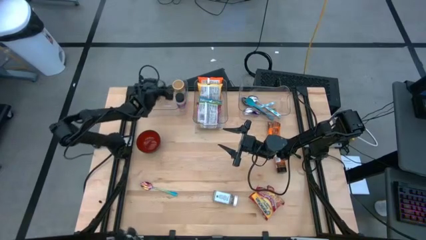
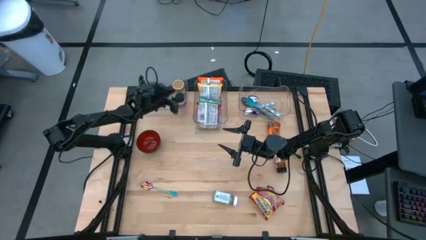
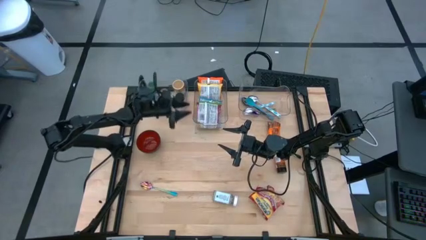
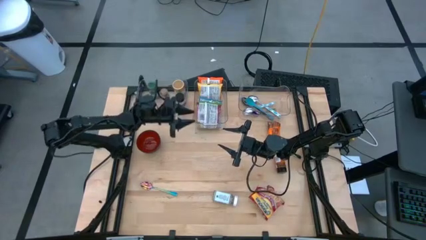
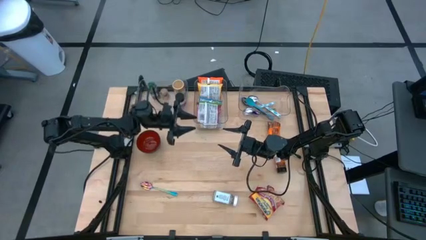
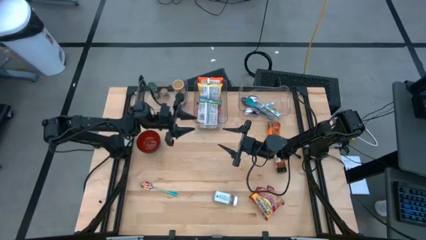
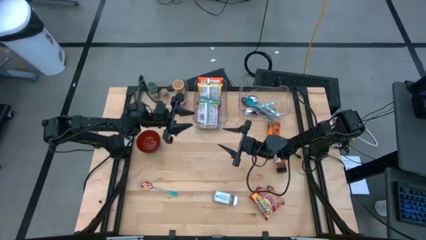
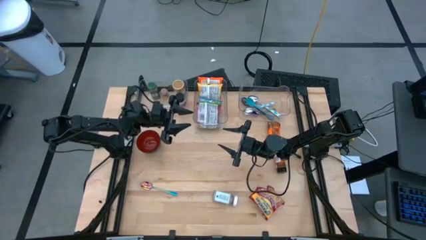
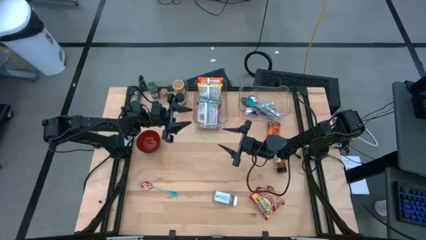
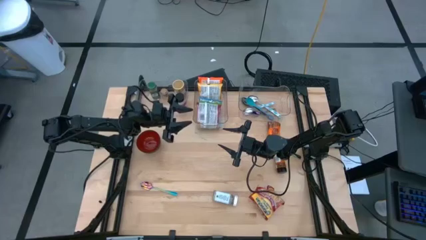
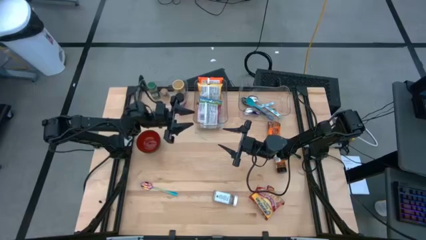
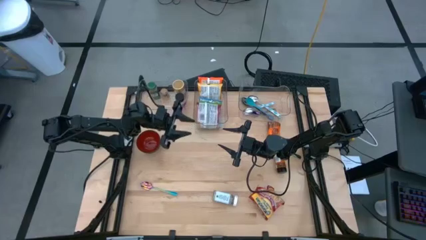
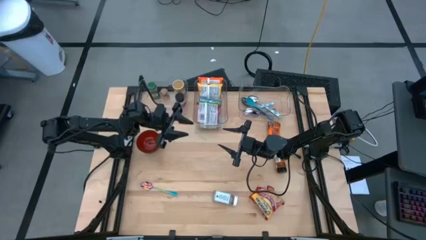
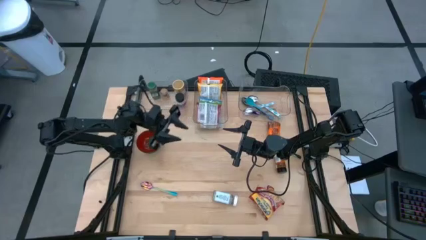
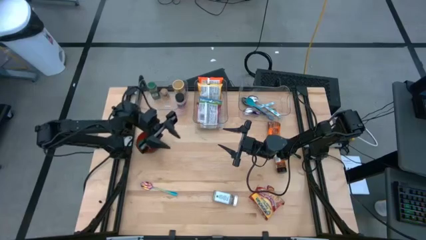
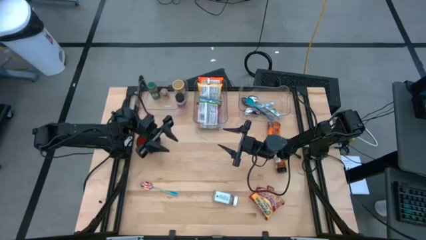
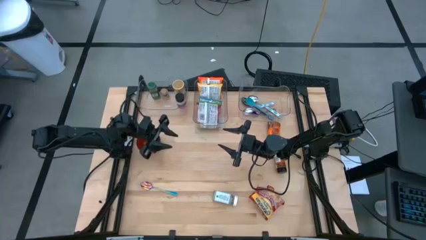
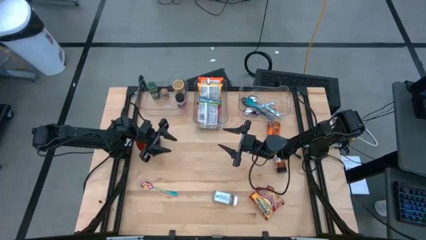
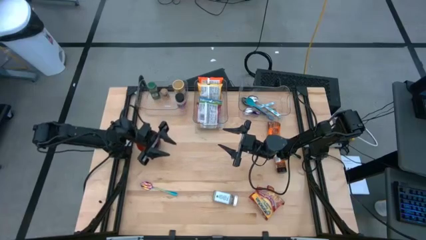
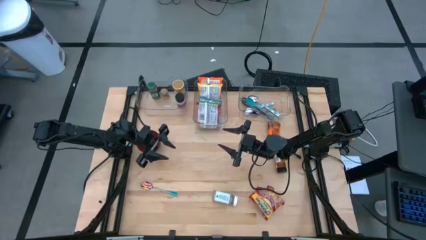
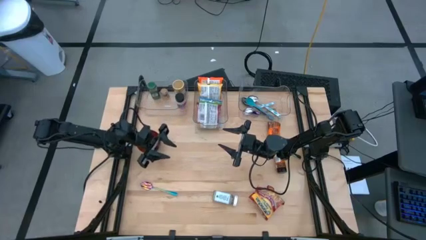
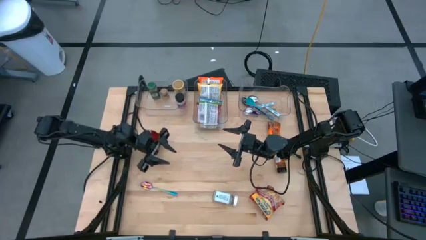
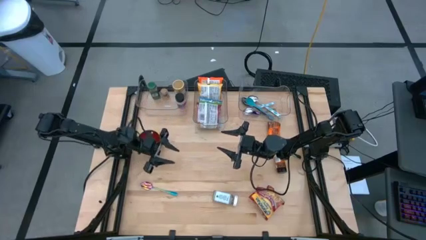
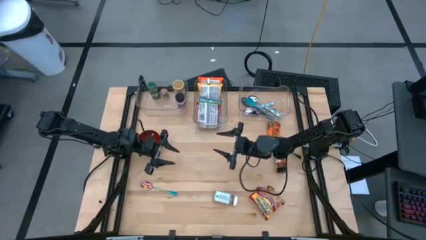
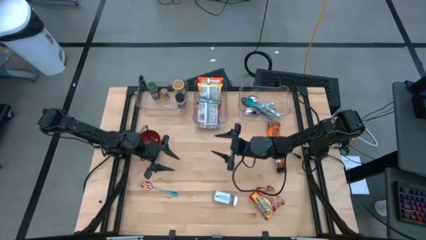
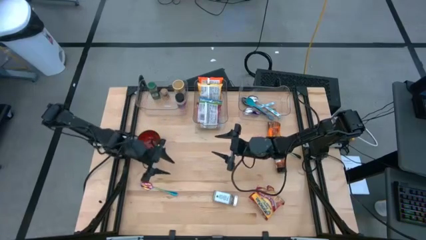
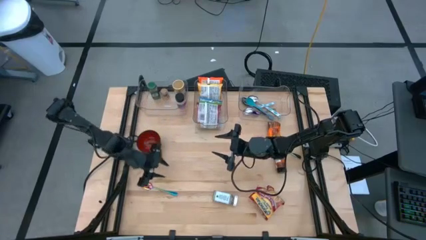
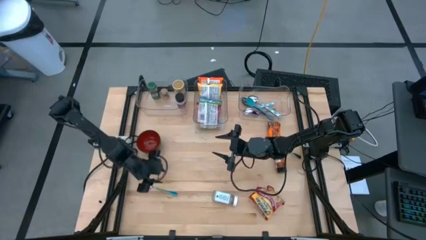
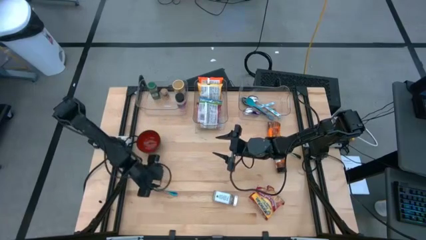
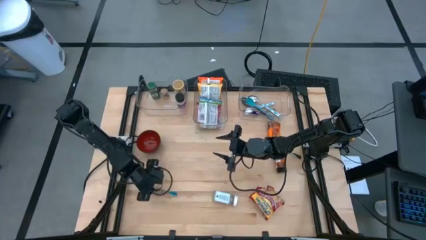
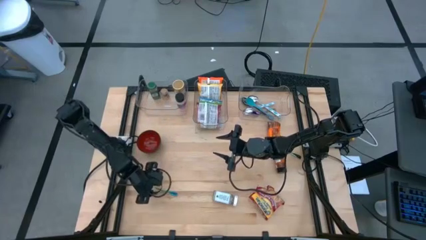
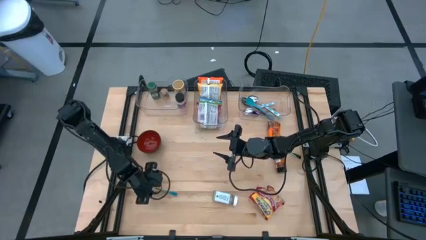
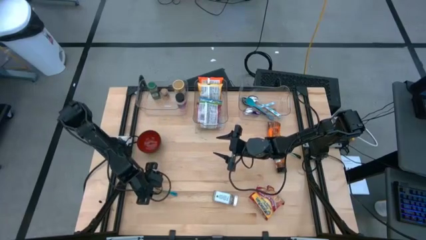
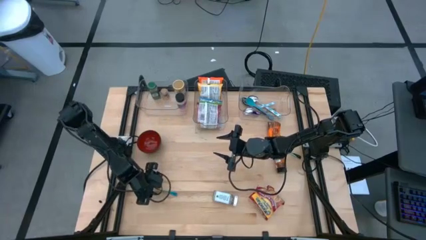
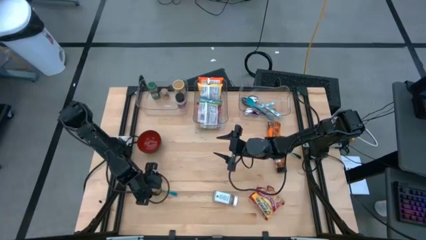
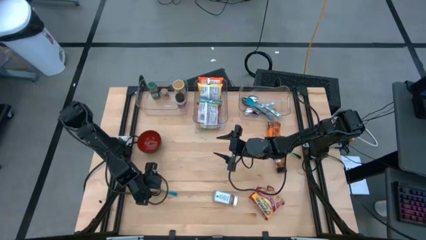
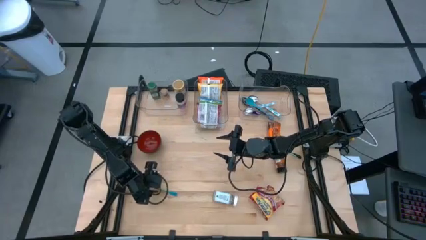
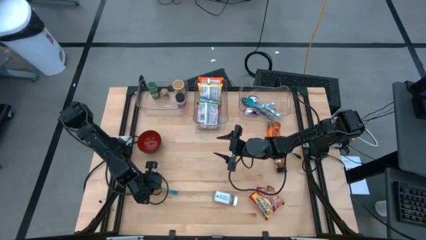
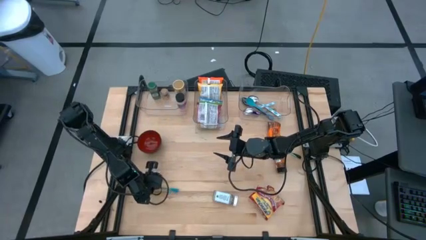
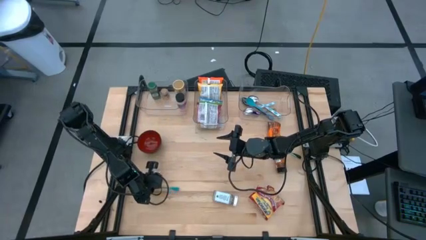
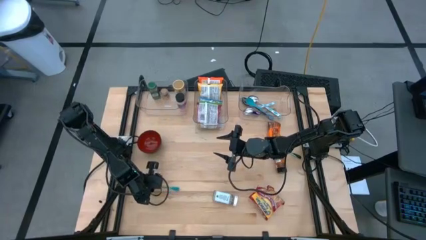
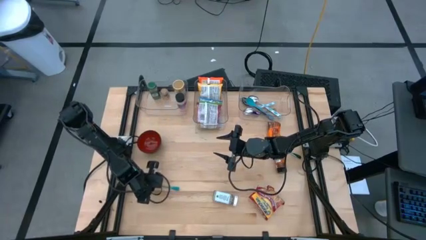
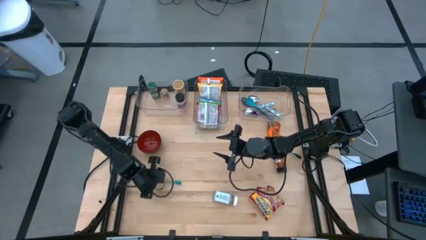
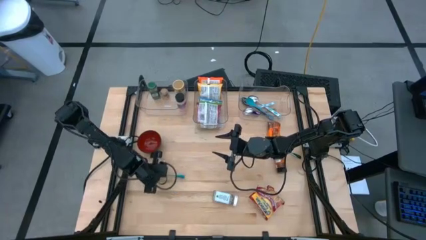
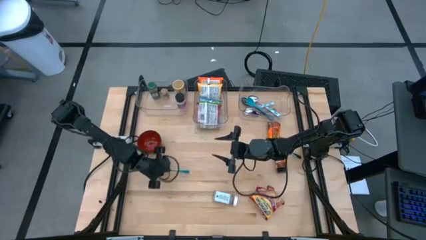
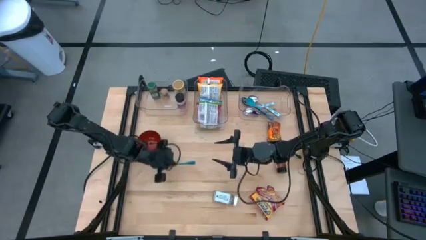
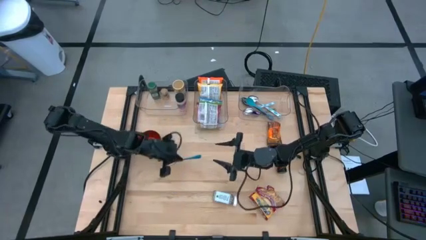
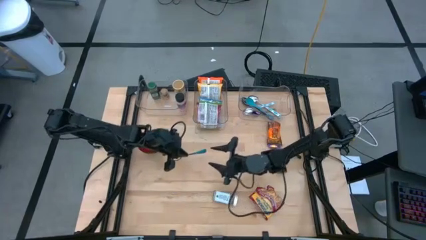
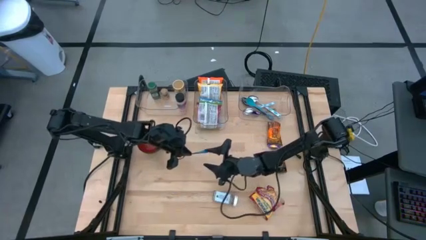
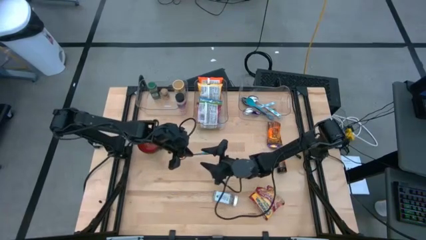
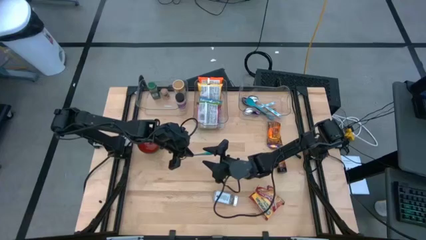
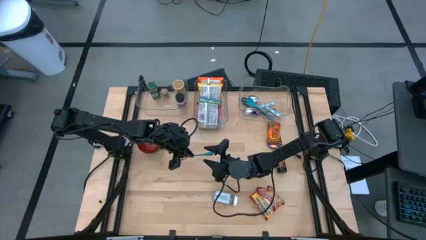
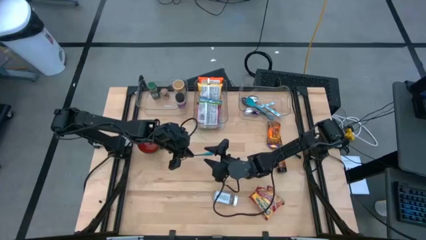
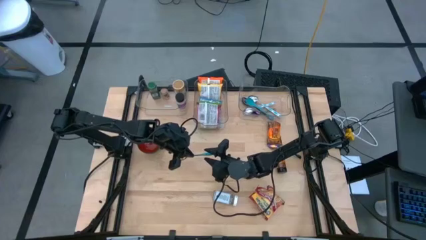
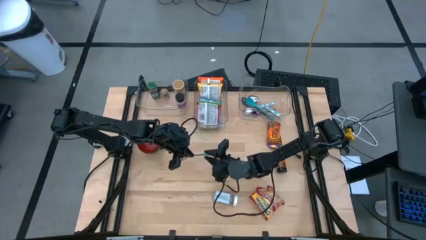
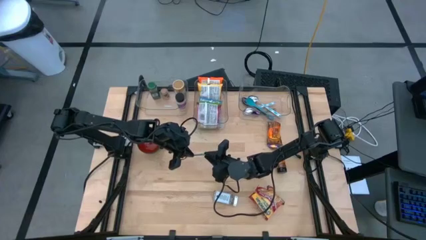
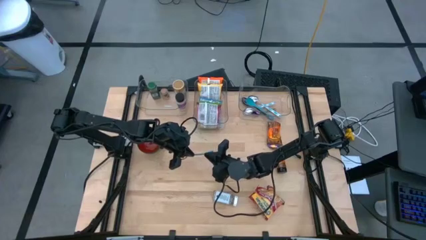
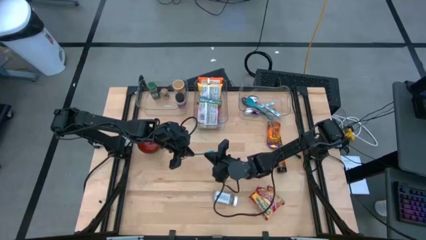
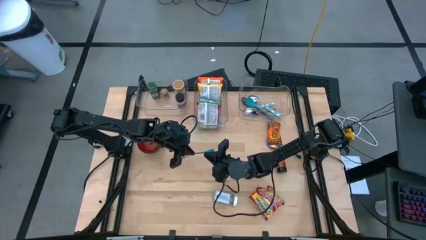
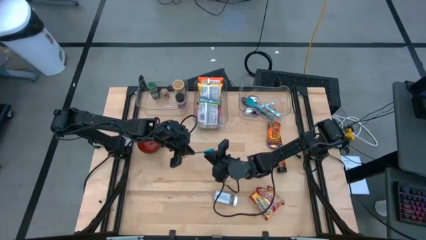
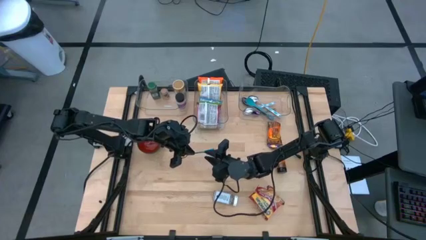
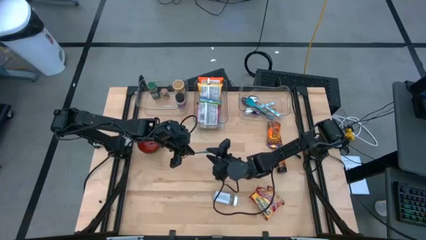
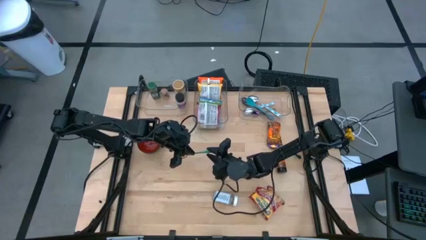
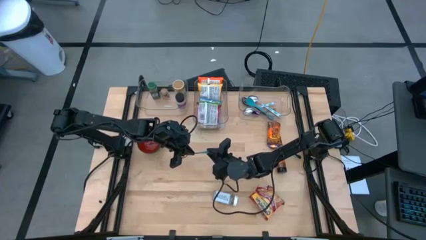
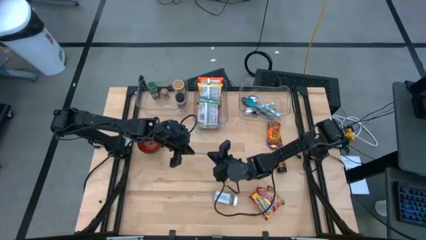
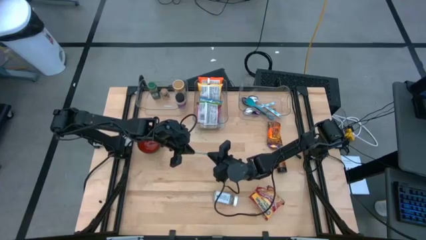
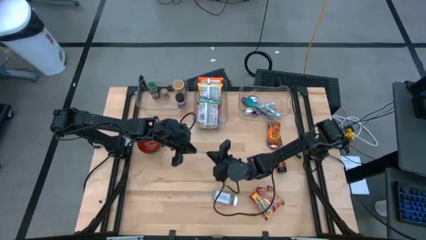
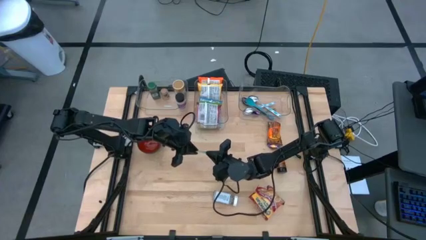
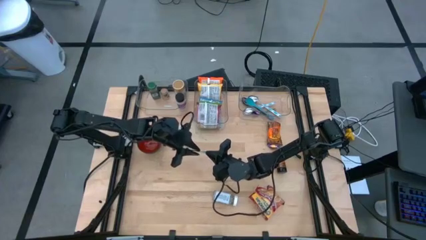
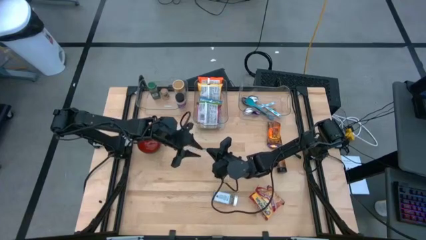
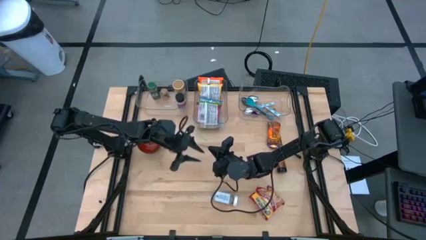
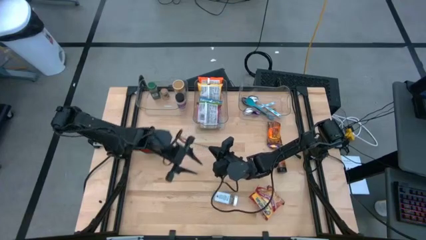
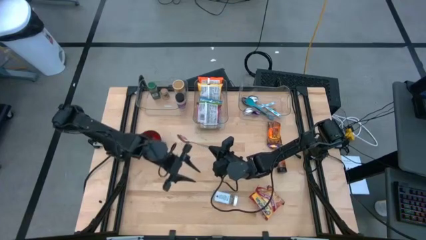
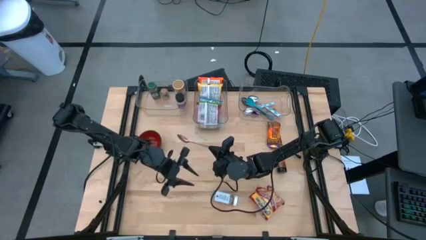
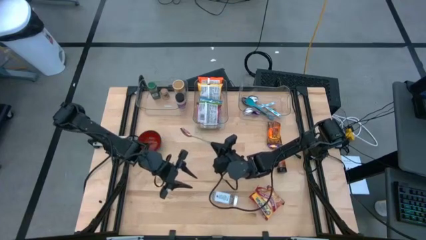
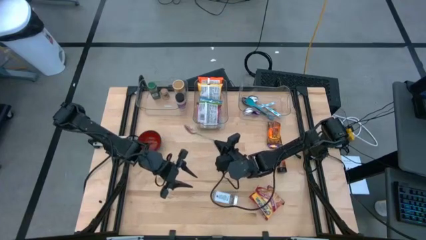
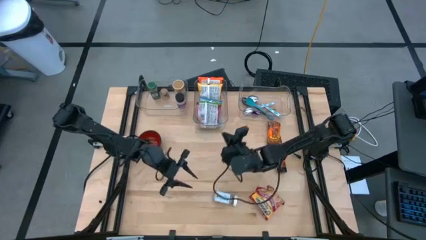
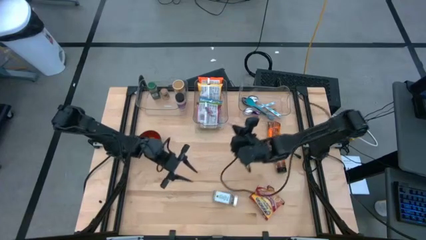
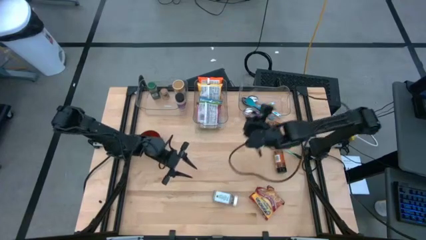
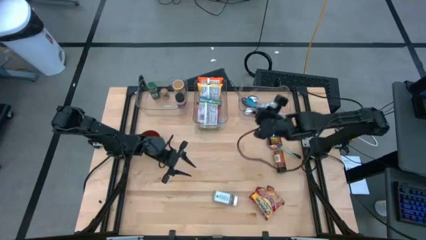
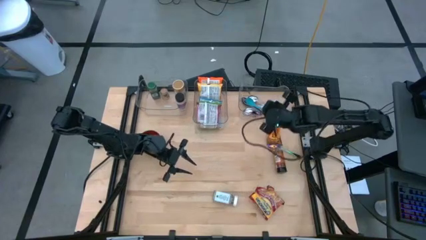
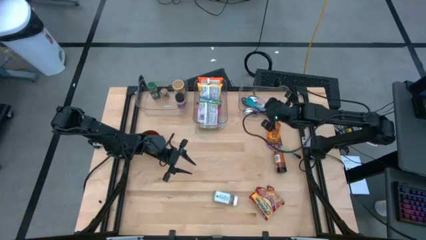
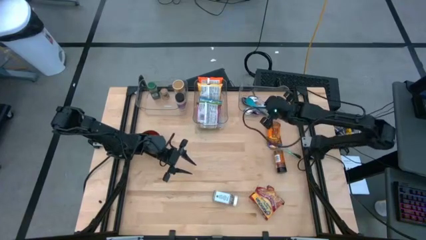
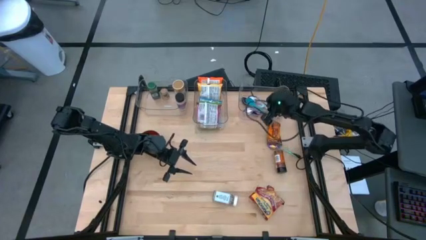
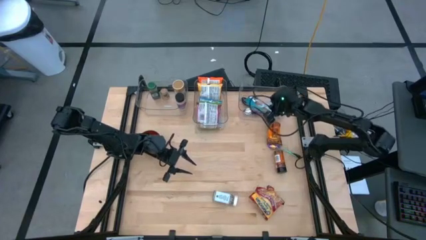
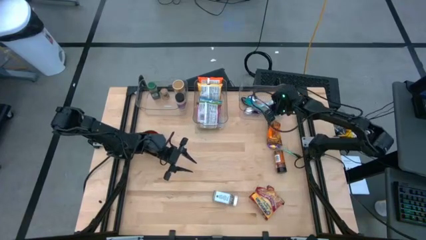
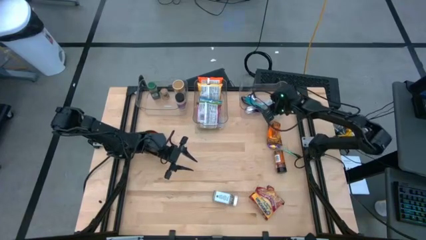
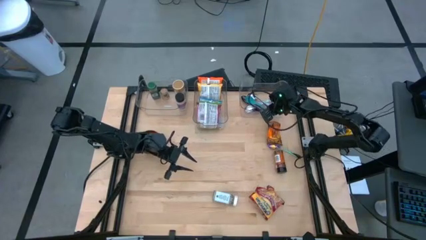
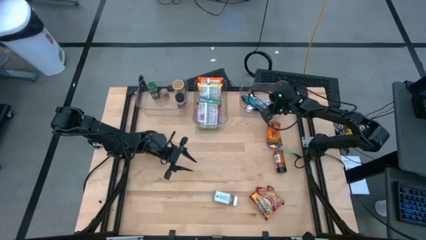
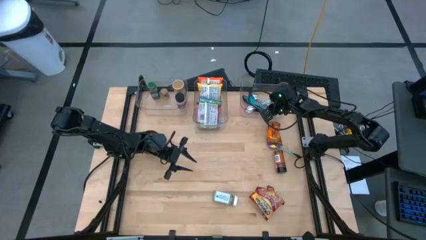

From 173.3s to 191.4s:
Task: Pick & Place Food Item
Put the bottom blue spoon into the right transparent bin
